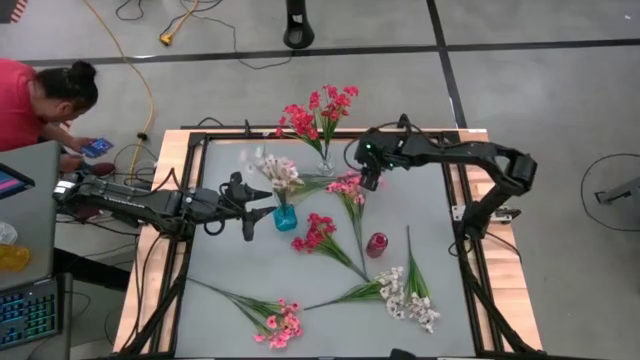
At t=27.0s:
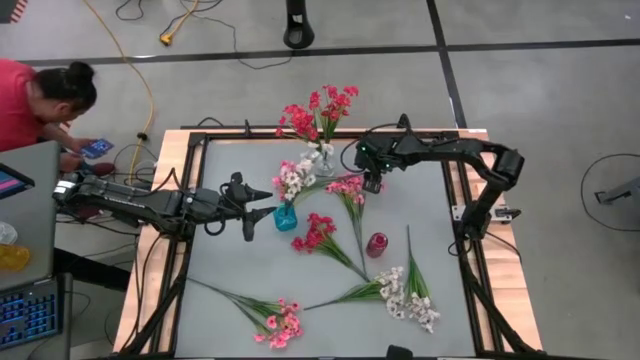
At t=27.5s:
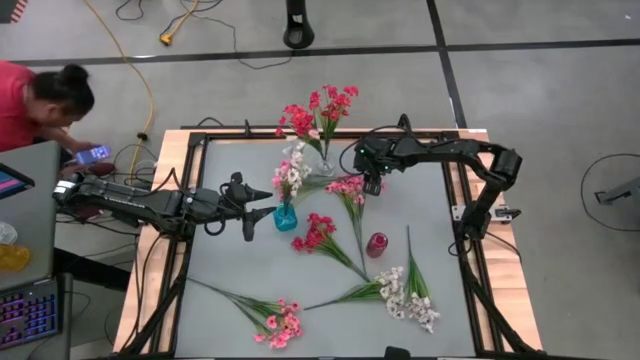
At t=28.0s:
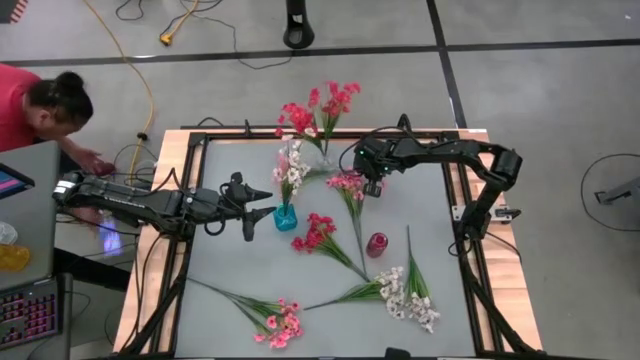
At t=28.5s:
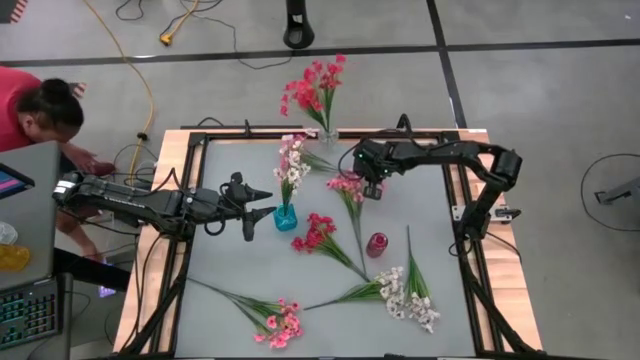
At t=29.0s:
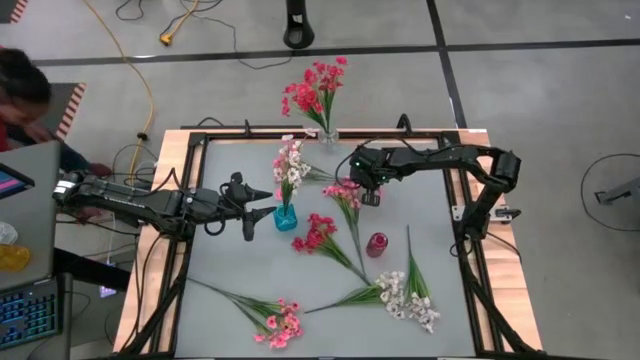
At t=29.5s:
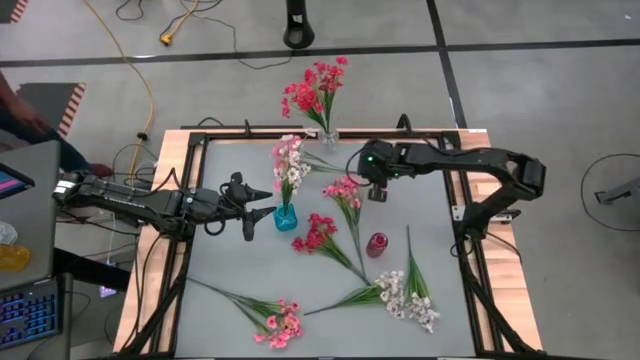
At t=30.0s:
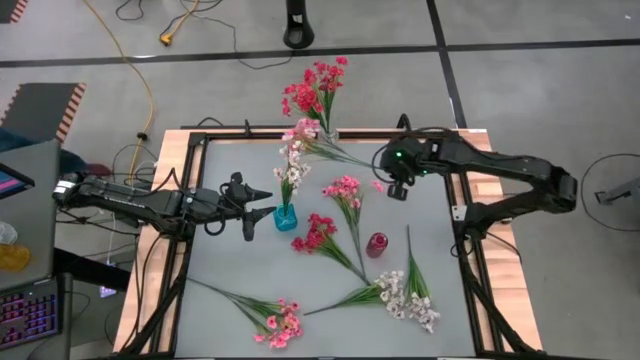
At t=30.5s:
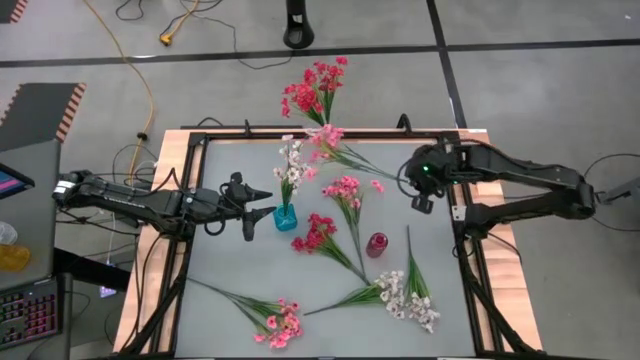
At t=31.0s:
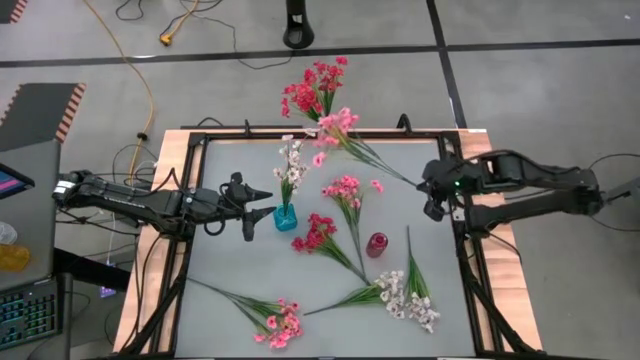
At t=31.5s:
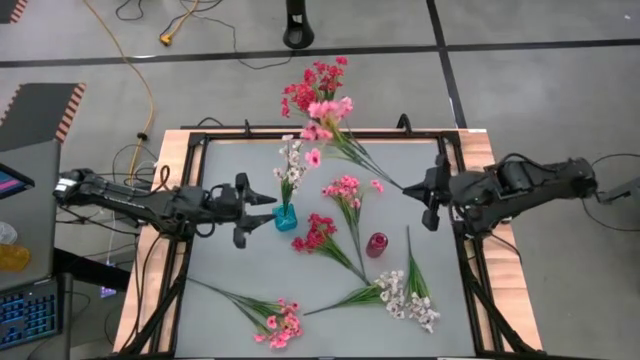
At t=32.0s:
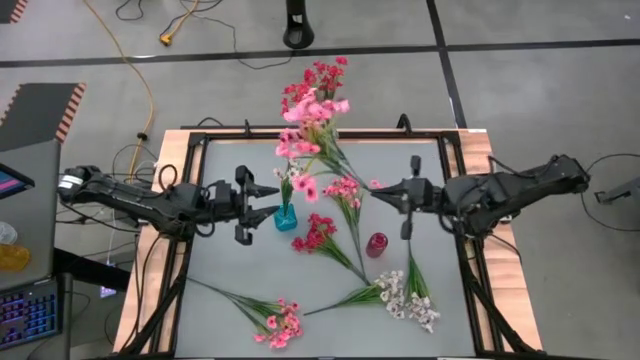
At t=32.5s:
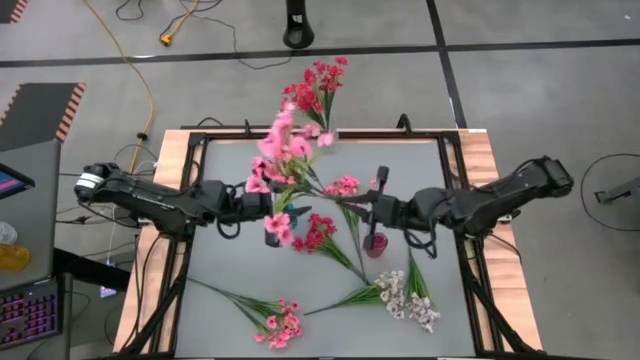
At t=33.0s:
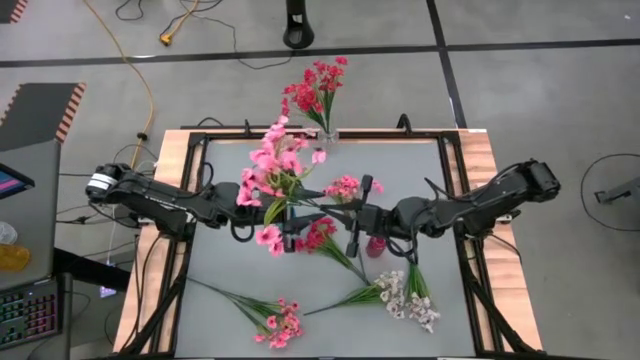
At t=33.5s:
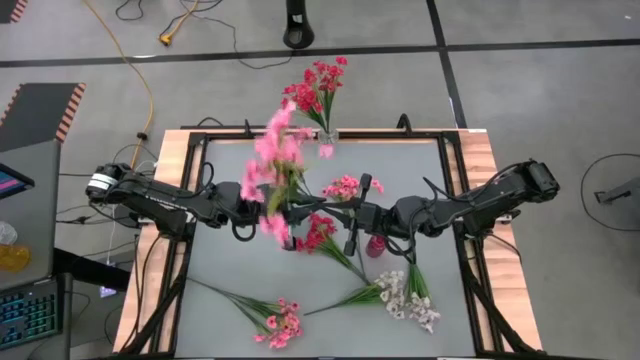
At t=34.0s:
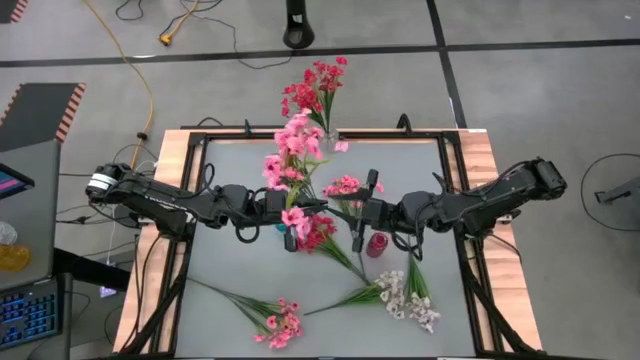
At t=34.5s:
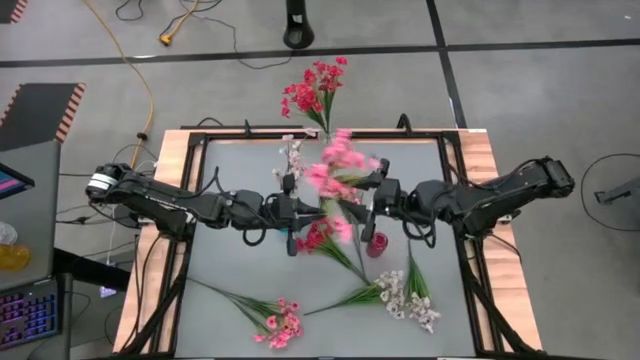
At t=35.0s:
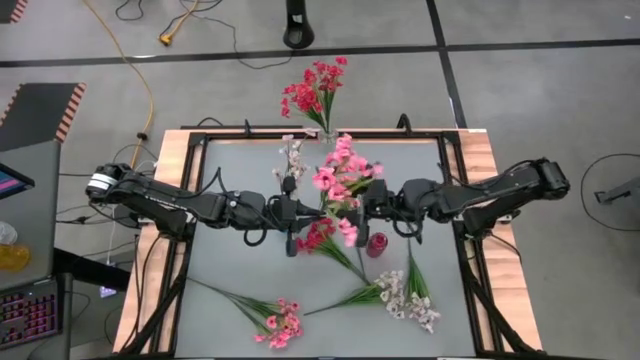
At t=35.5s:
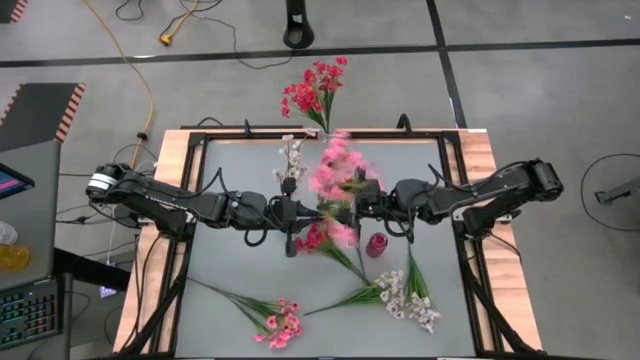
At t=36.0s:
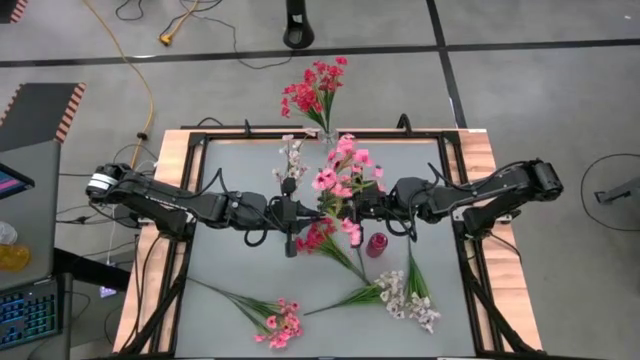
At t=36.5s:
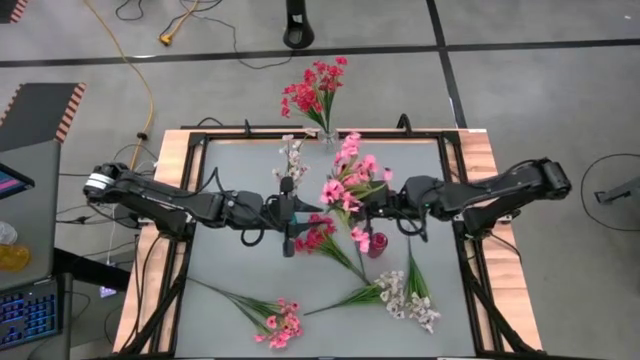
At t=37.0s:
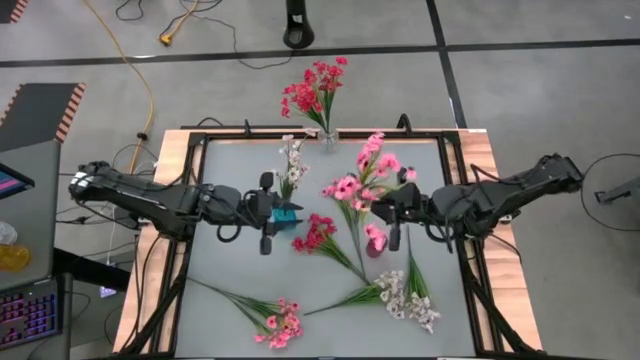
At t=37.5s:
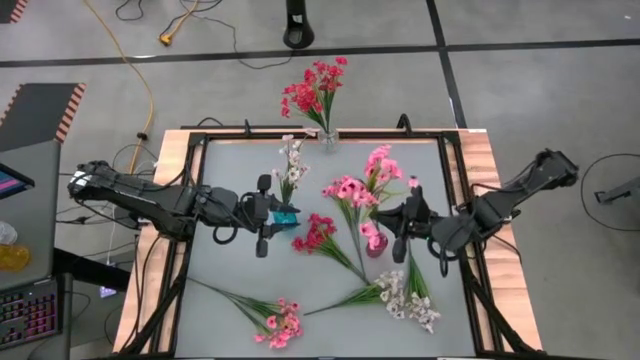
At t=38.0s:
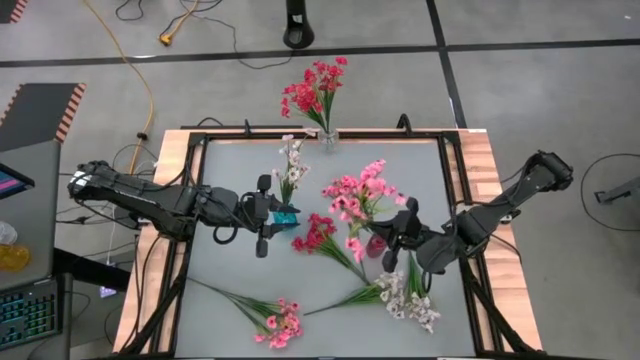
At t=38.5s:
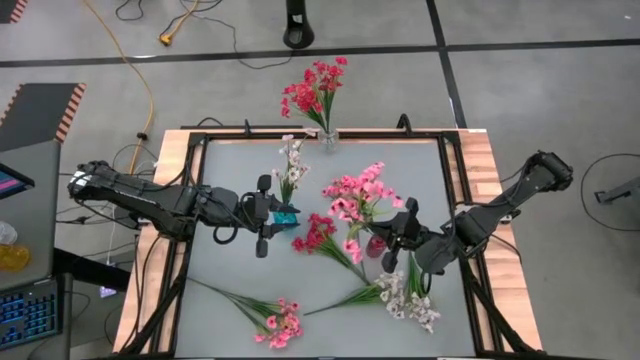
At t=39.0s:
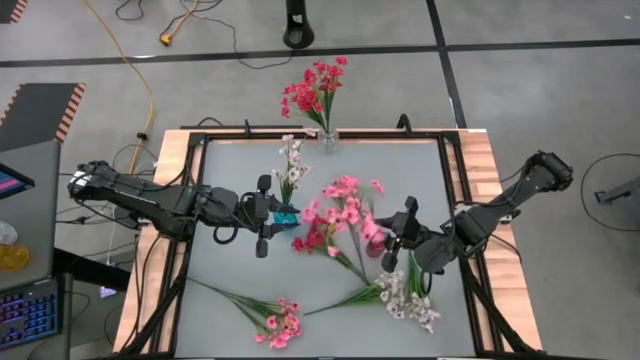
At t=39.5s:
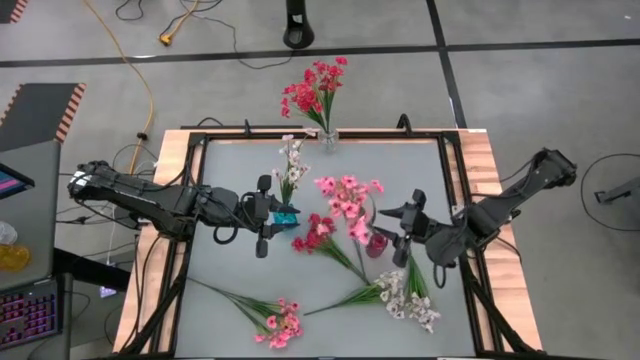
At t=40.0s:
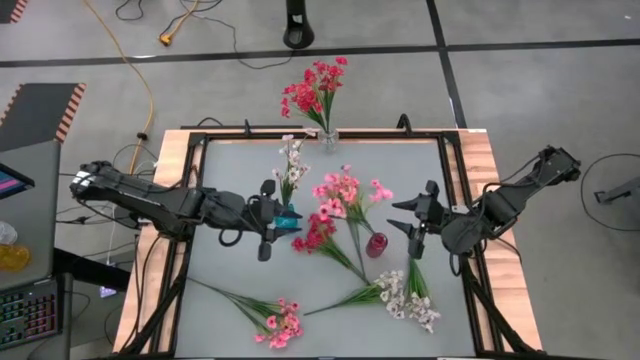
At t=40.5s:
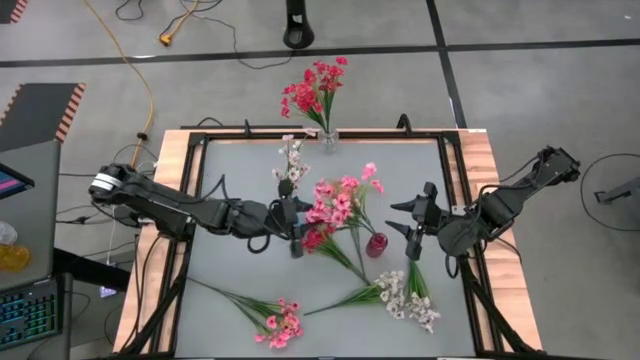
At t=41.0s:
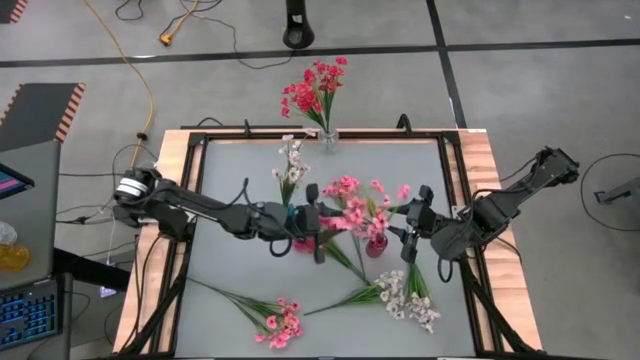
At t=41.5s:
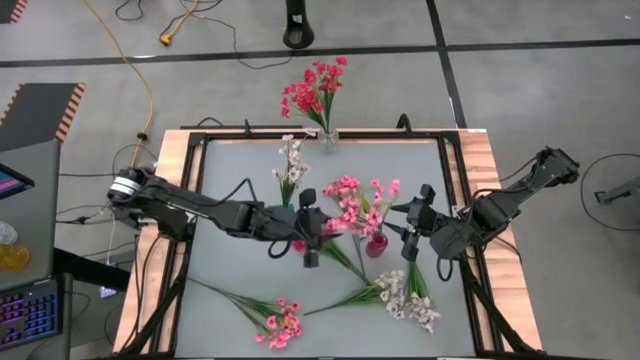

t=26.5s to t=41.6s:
Task: Sort flowers into vase by color
Put the top pink flower into the red vase

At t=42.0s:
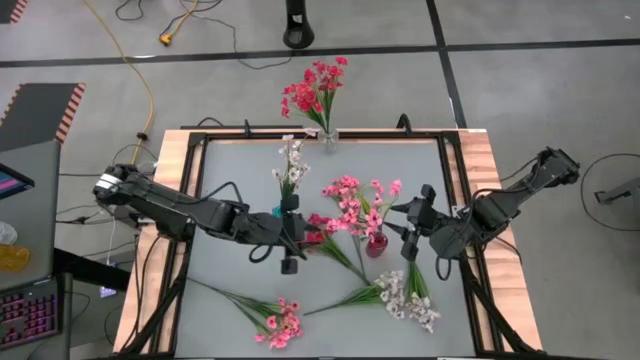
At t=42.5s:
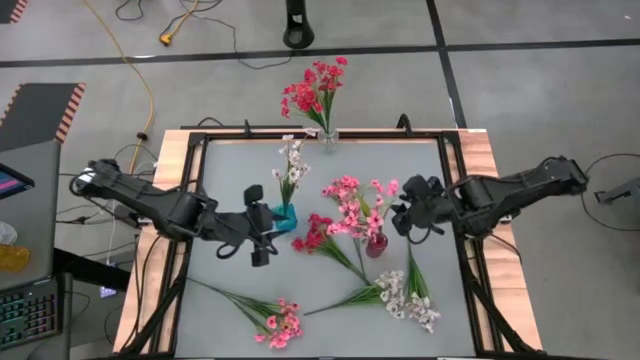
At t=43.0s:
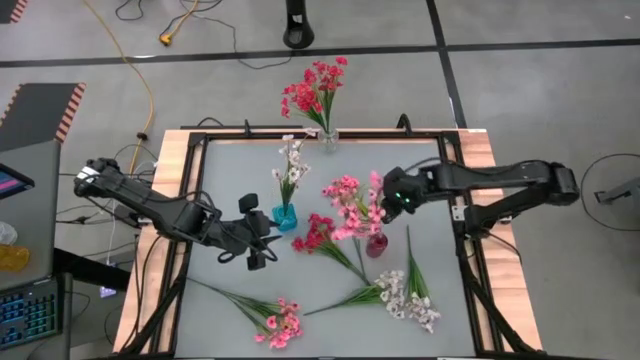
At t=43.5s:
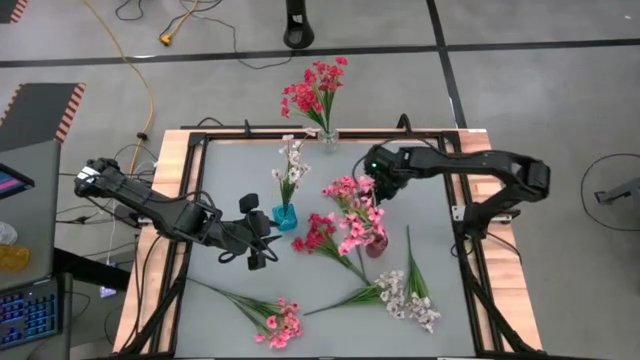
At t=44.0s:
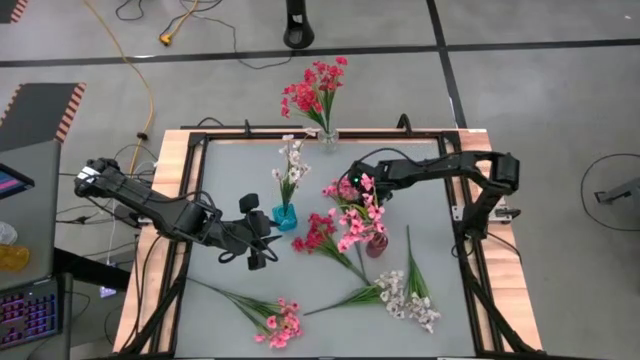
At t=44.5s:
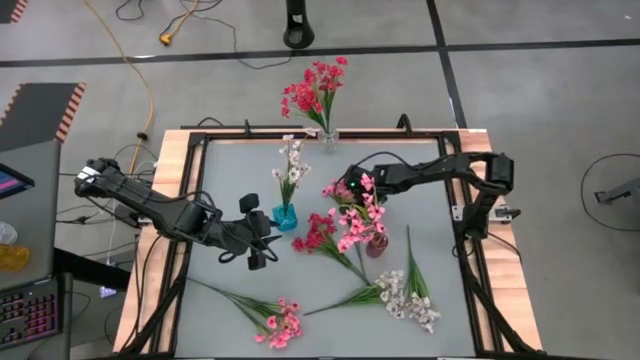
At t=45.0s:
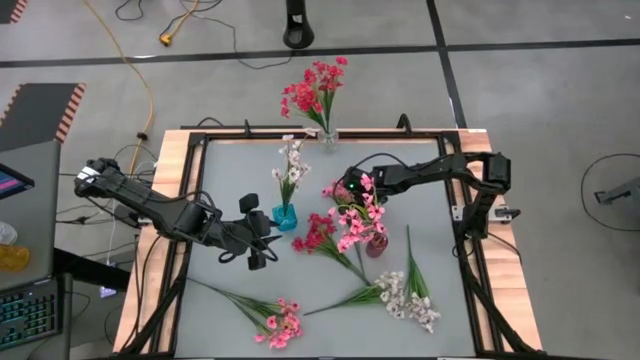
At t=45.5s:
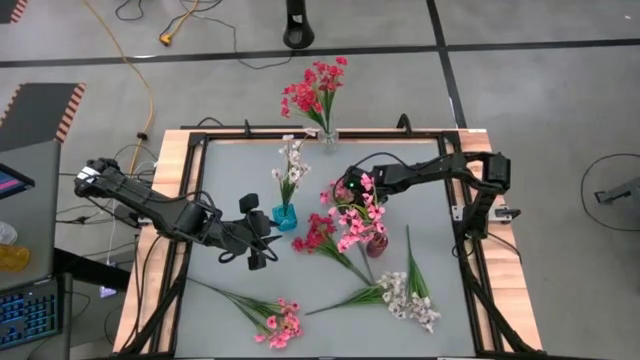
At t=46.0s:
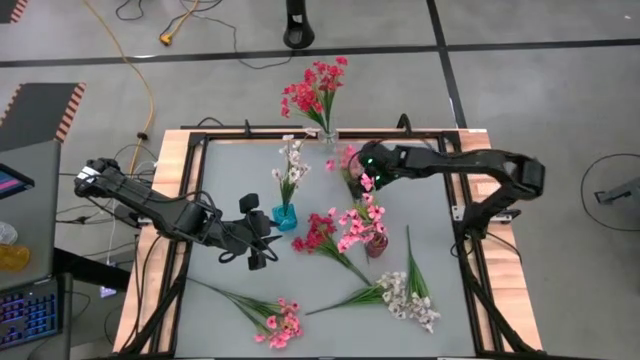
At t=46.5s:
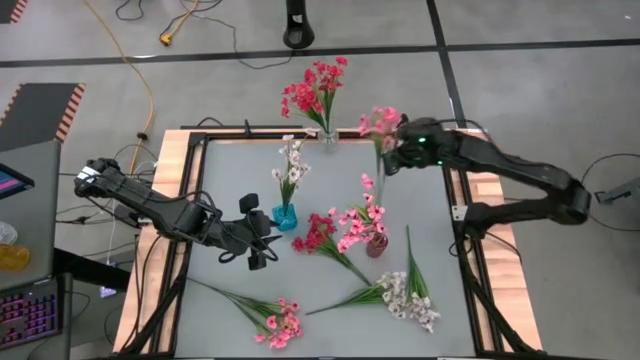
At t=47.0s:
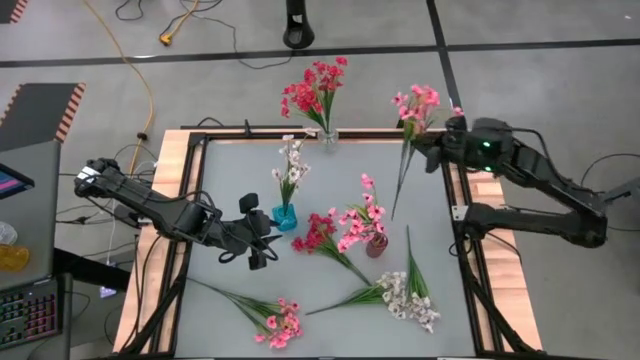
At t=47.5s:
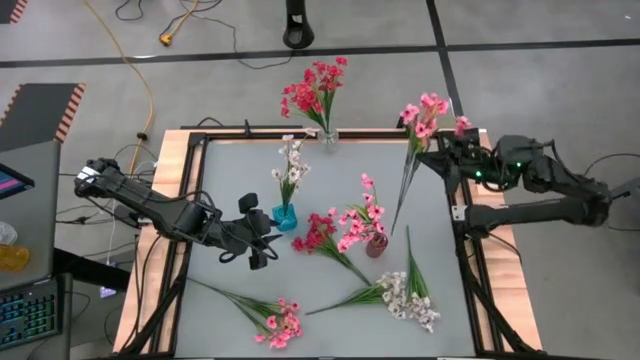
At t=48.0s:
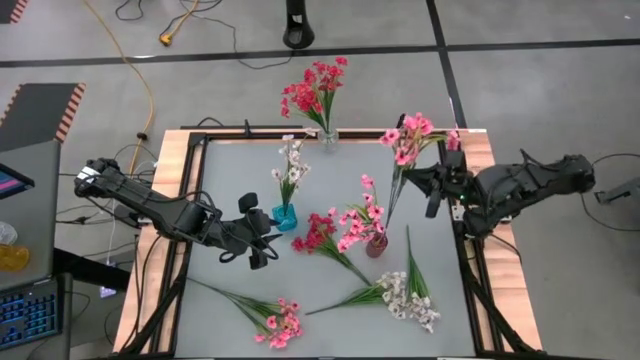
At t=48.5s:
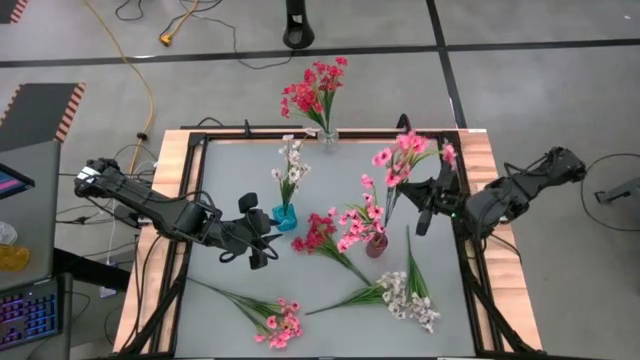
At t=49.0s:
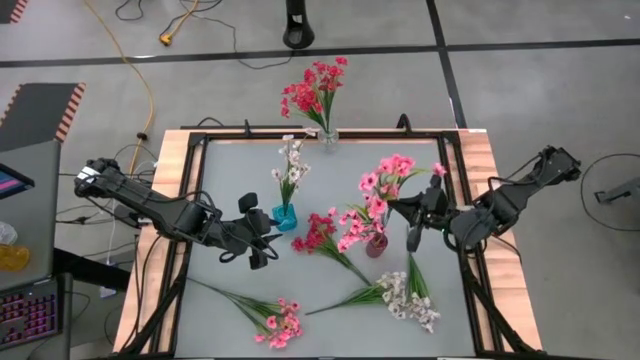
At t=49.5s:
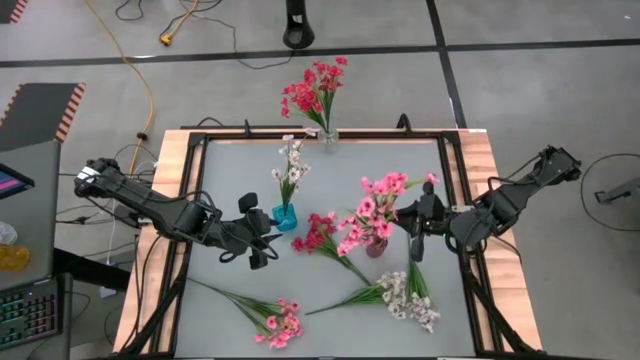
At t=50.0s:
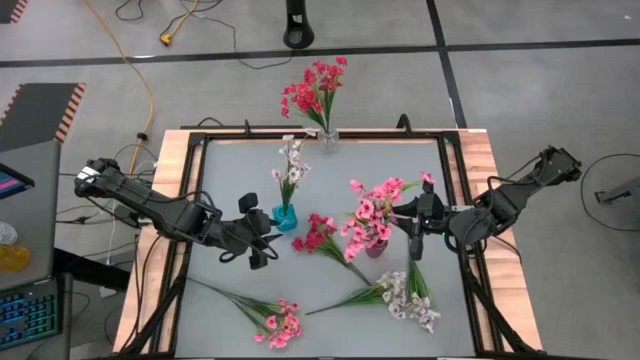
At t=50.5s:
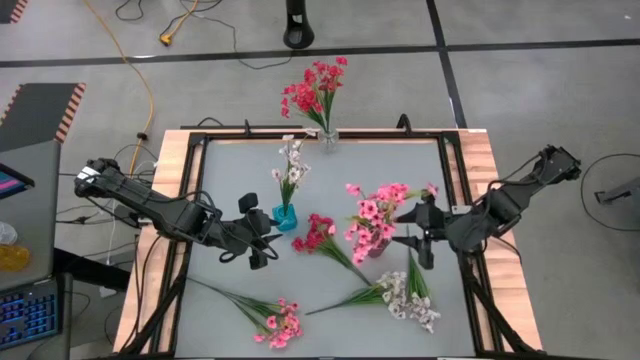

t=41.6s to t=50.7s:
Put the top pink flower into the red vase
